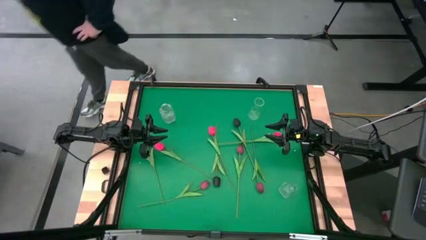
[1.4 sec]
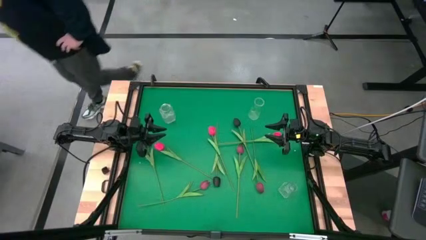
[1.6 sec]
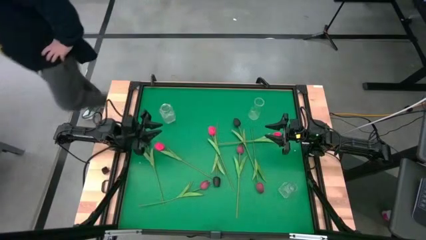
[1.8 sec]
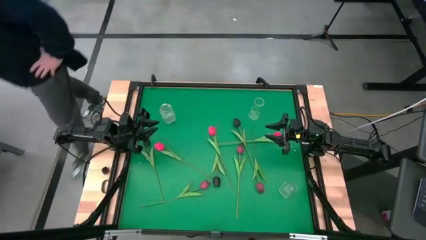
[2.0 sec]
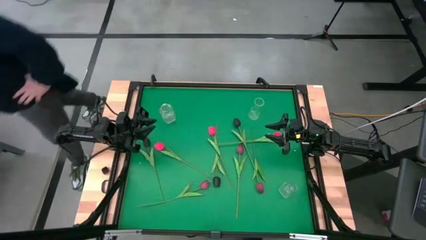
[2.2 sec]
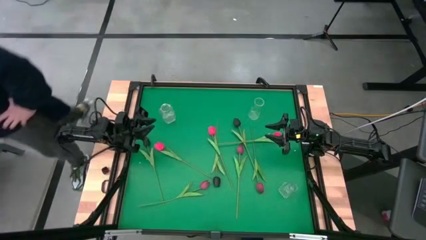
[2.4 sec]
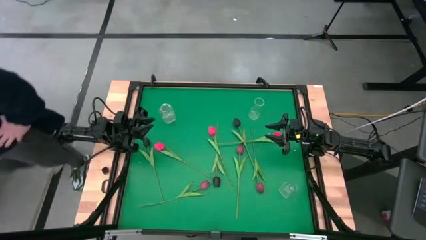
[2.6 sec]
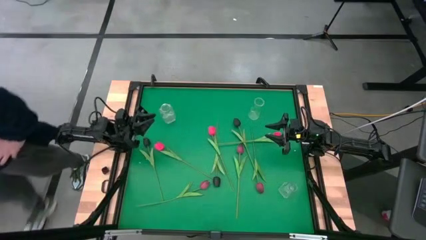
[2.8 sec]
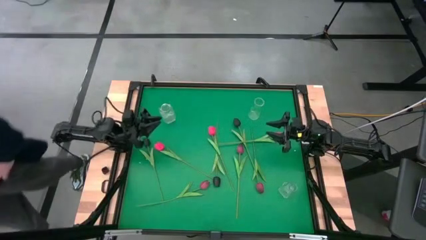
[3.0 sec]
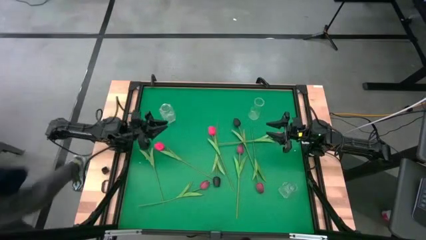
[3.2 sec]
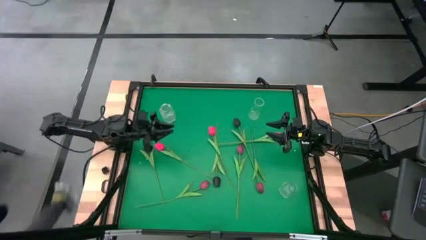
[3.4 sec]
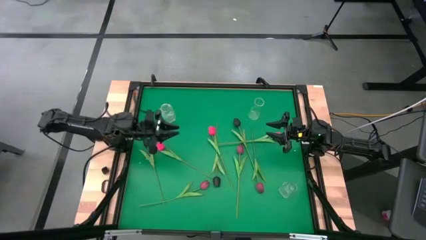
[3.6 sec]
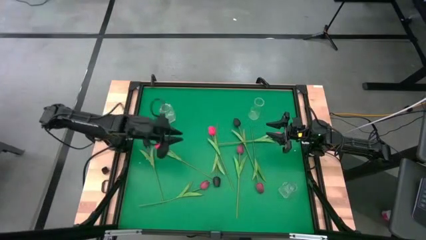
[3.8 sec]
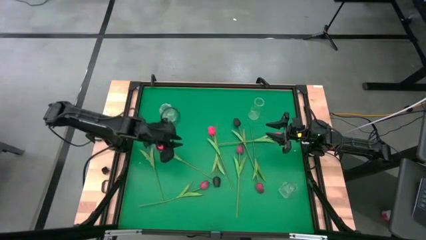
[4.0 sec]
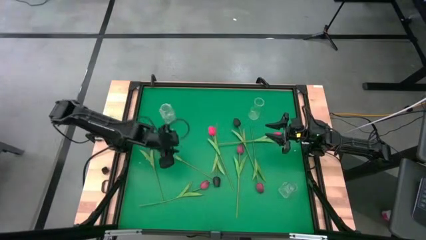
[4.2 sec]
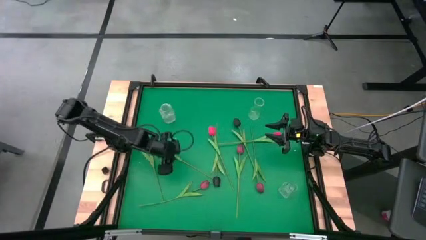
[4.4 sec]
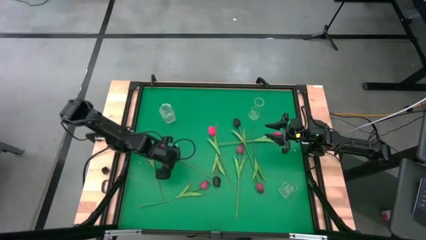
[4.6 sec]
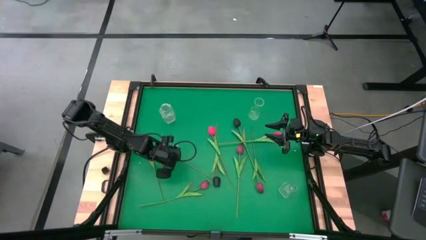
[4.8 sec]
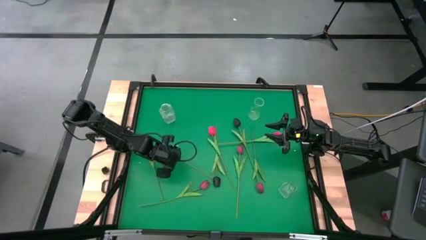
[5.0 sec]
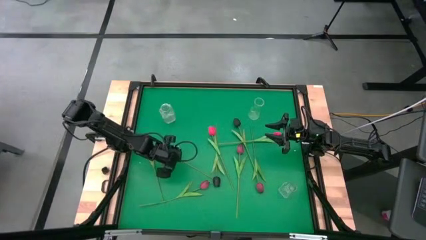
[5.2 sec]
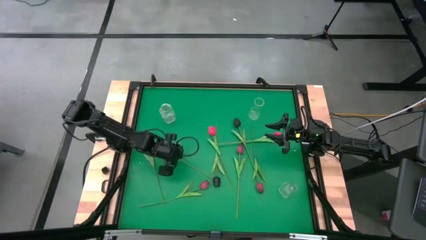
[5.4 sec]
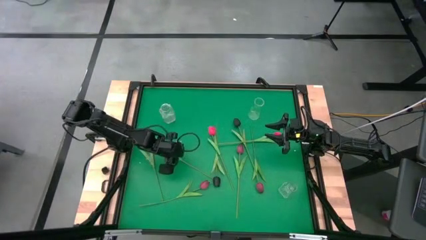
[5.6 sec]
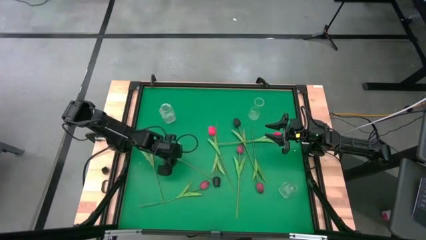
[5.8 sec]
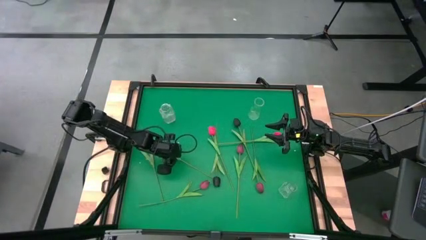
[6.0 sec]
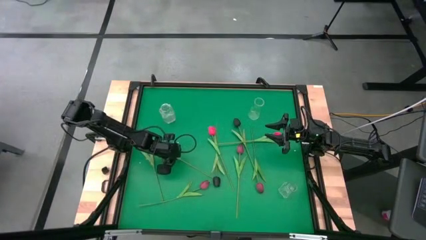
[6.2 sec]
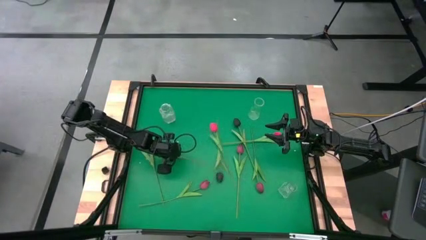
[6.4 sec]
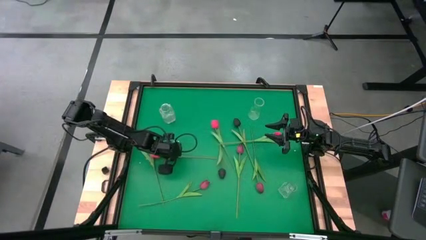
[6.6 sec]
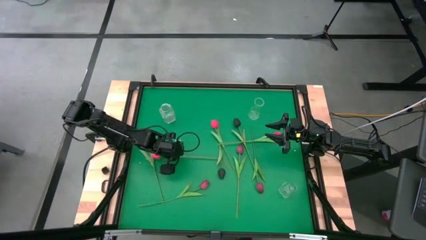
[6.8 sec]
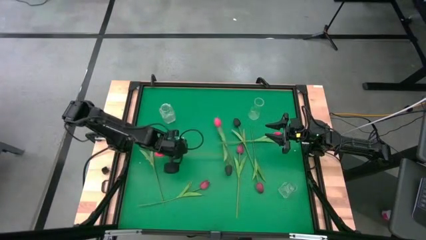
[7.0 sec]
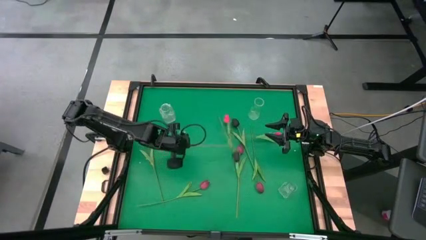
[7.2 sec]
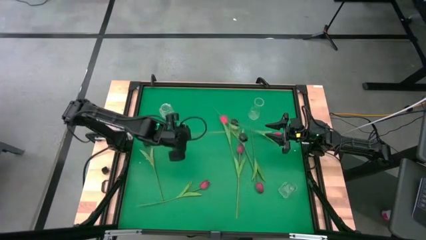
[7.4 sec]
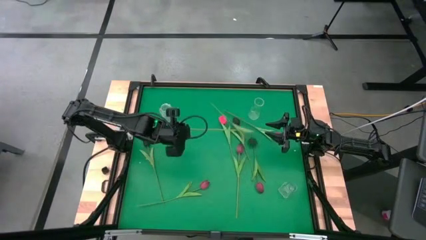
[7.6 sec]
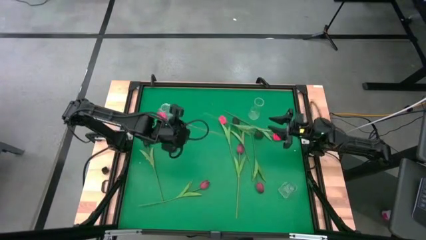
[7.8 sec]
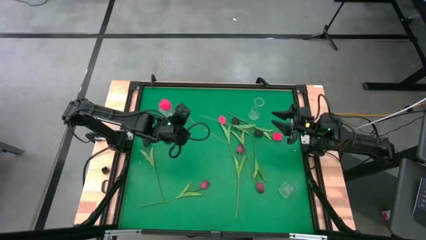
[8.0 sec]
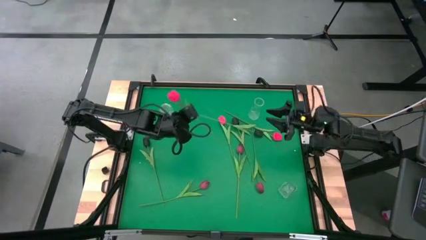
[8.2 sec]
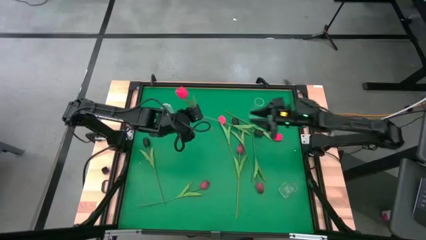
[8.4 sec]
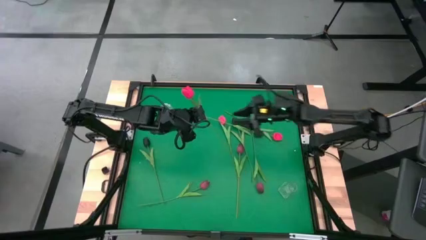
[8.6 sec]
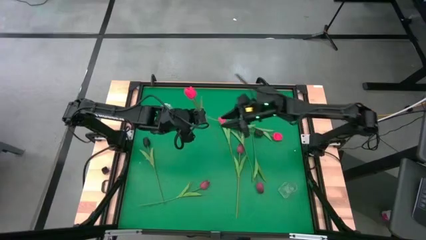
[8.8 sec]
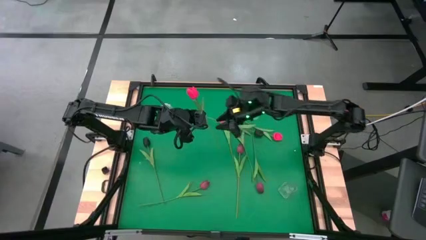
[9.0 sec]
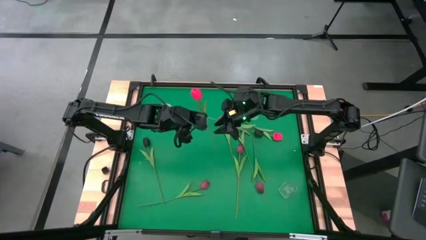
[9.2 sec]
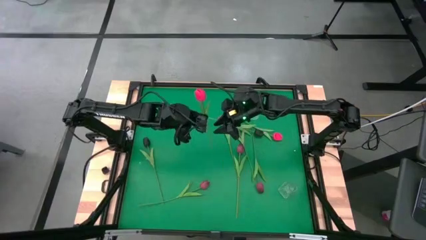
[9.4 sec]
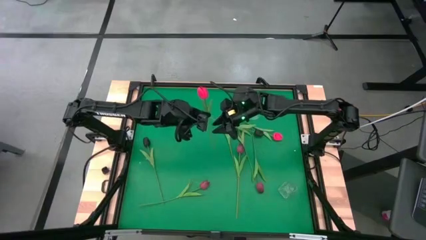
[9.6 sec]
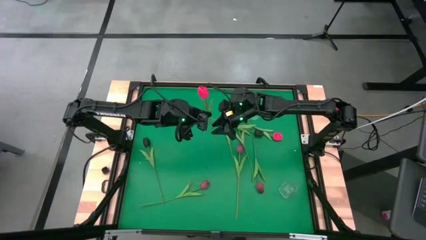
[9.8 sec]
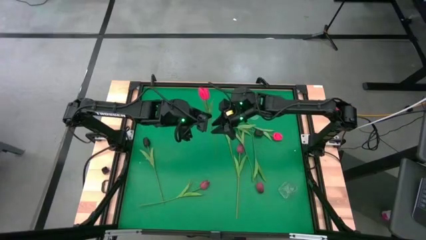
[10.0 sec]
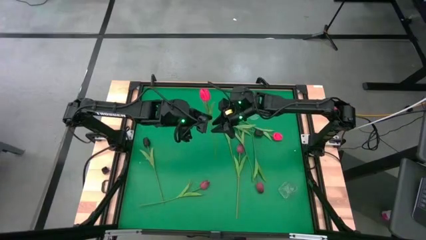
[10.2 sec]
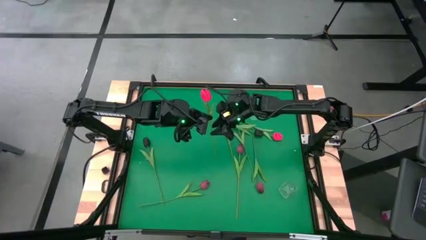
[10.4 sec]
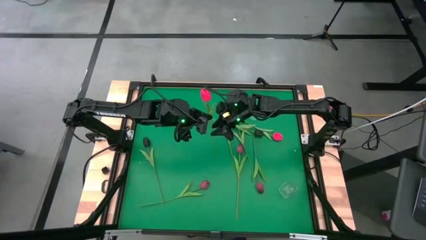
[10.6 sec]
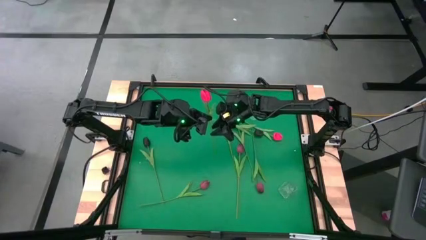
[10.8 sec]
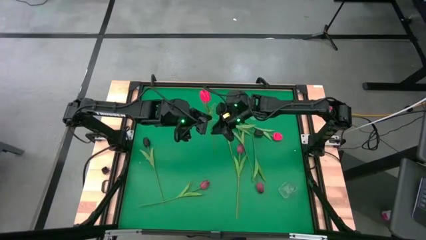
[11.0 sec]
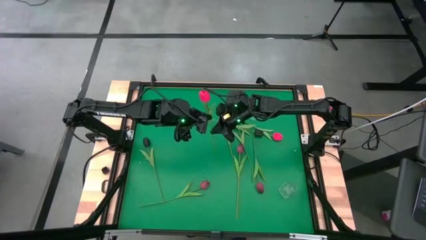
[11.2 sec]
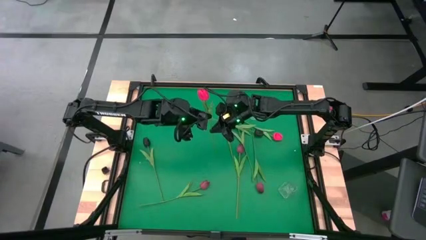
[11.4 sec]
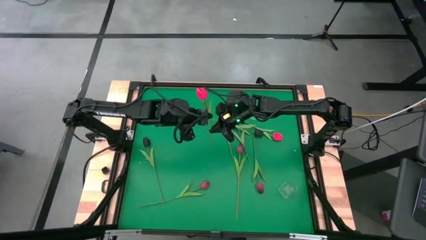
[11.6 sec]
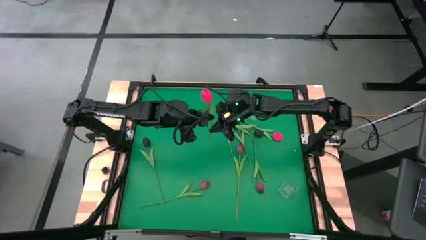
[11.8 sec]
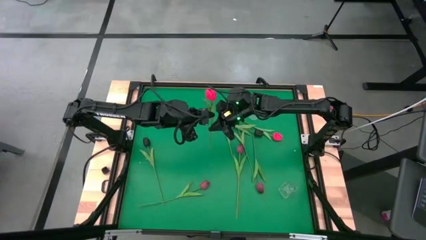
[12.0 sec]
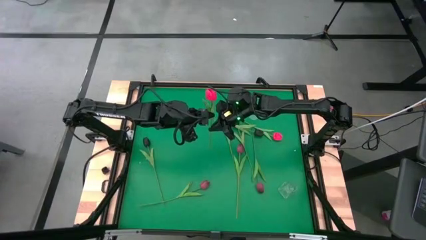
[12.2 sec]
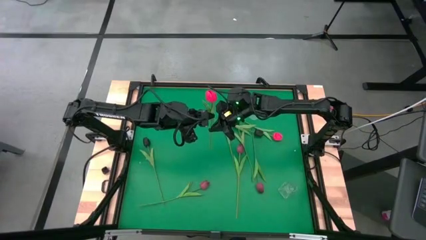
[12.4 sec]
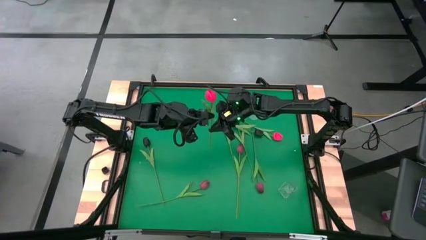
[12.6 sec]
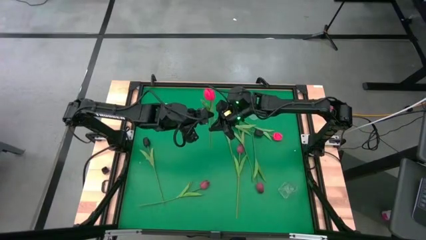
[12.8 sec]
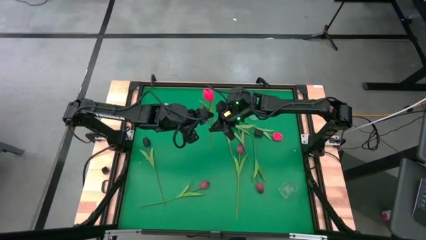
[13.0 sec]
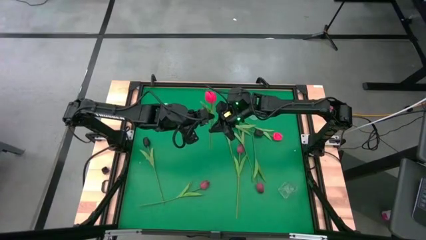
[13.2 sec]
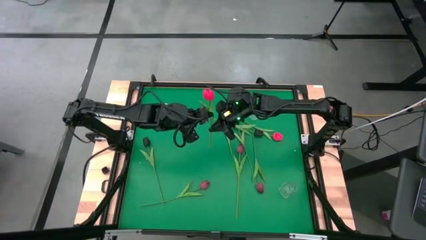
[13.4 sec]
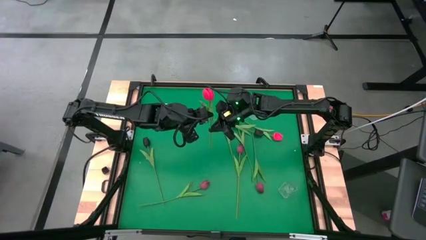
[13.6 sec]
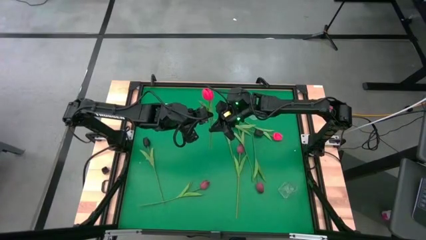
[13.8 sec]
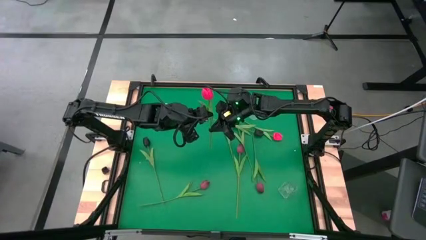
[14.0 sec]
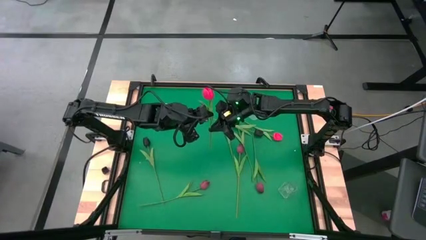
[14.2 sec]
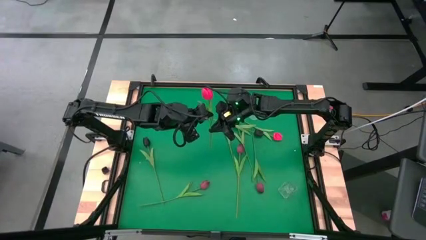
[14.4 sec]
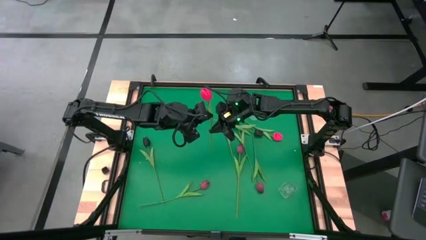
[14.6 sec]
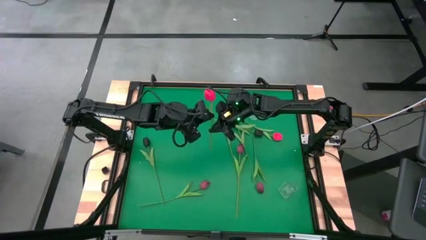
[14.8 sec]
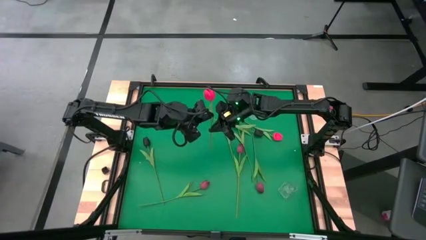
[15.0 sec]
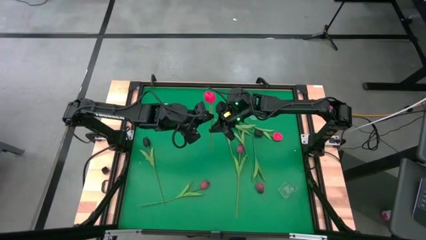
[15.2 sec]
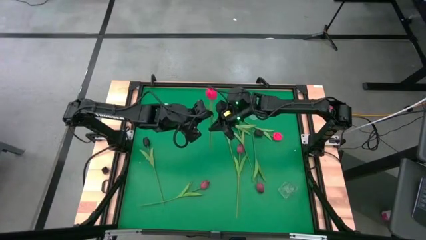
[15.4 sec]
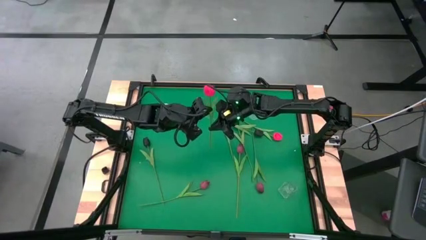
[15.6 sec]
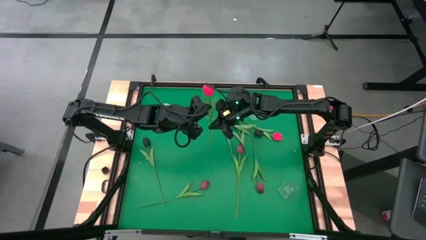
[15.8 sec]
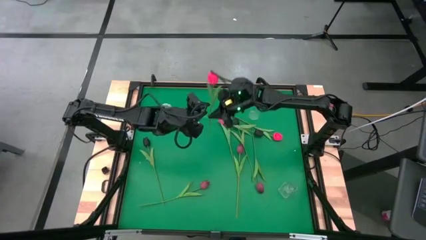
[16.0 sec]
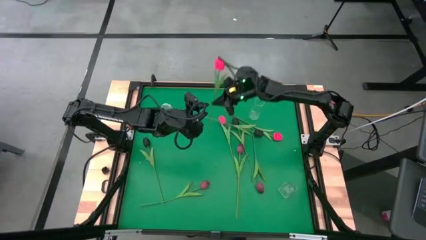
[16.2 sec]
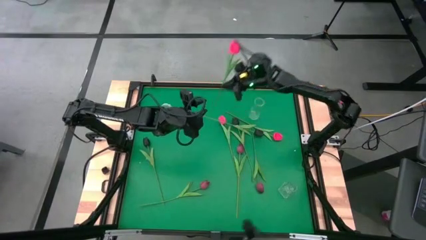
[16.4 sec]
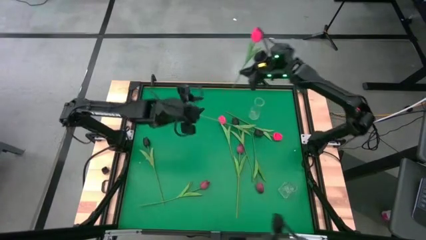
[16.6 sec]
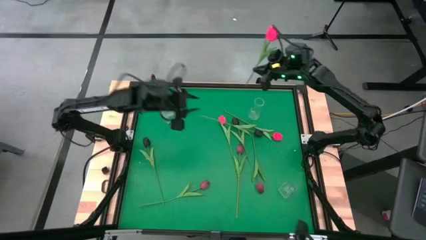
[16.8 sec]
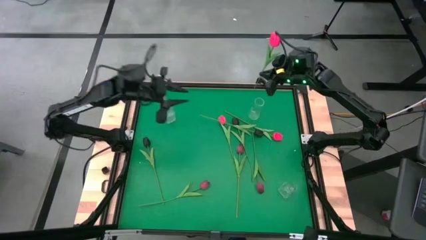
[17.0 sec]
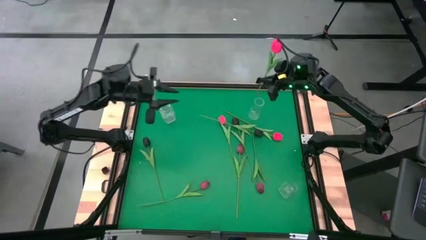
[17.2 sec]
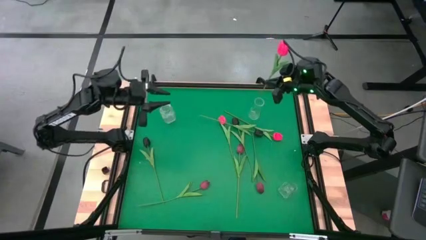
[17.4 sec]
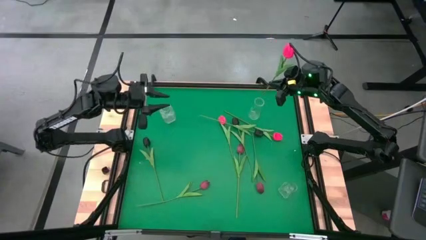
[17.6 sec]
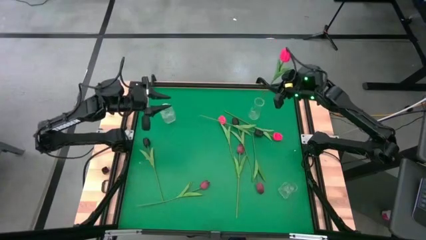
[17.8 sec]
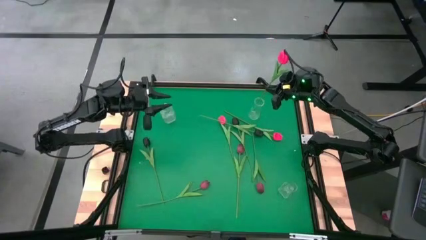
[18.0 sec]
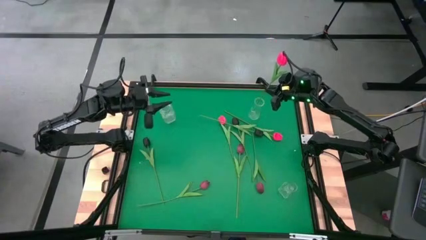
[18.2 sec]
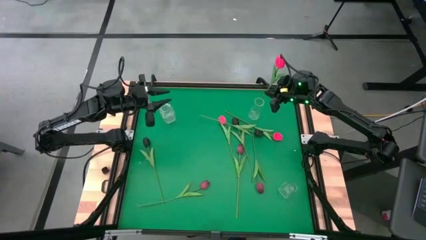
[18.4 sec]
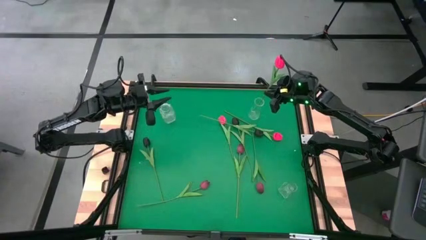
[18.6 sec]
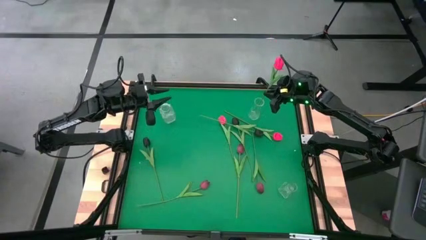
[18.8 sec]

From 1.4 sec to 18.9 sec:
Task: Sort flowers into vase by color
Put the left pink flower into the top right transparent vase
